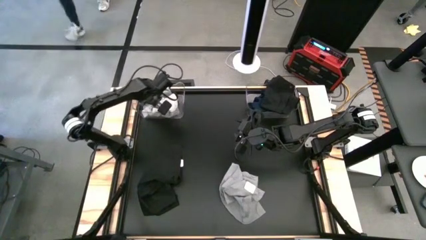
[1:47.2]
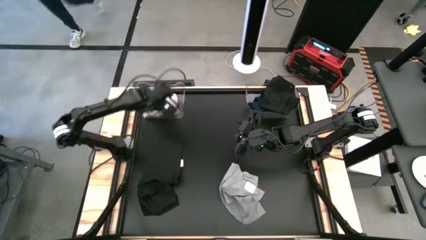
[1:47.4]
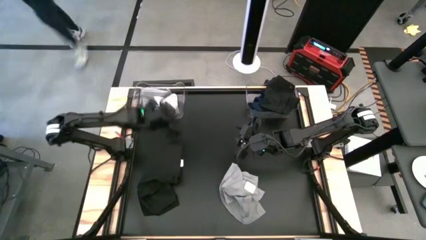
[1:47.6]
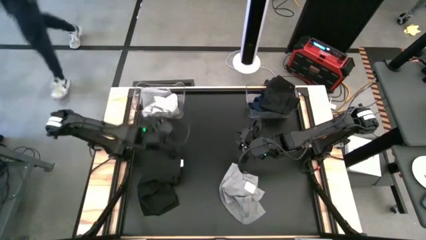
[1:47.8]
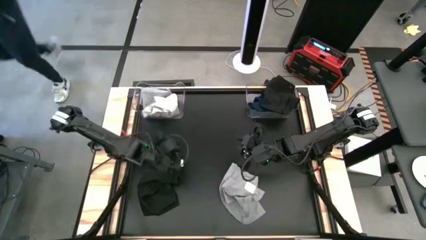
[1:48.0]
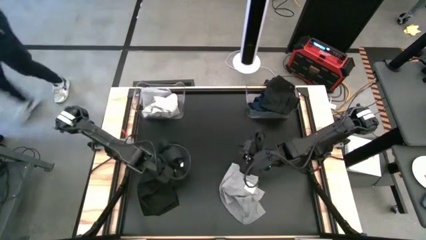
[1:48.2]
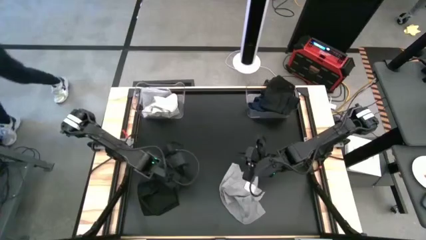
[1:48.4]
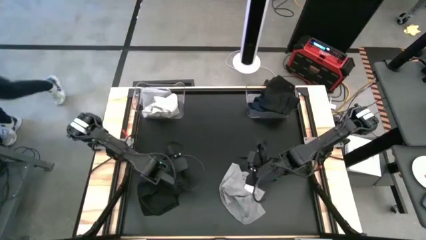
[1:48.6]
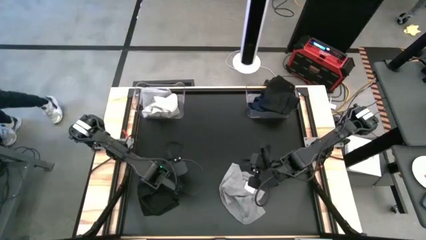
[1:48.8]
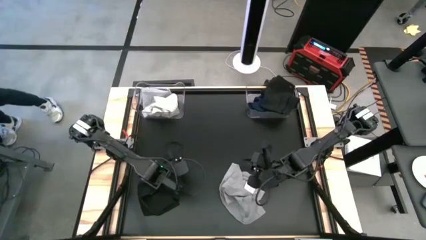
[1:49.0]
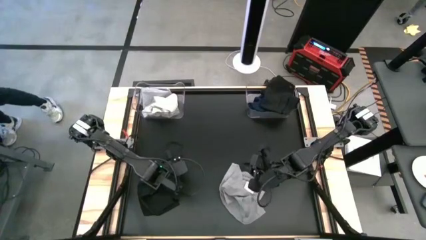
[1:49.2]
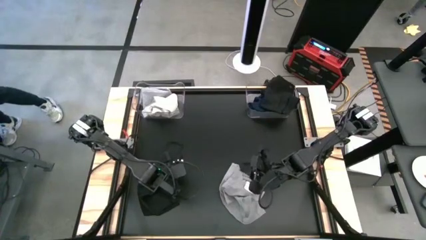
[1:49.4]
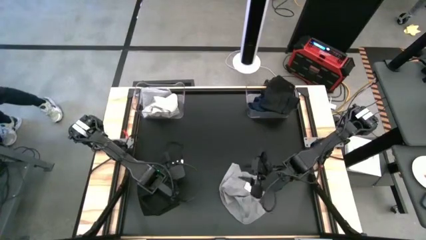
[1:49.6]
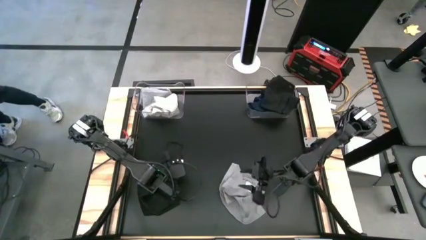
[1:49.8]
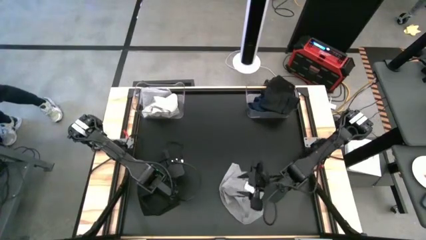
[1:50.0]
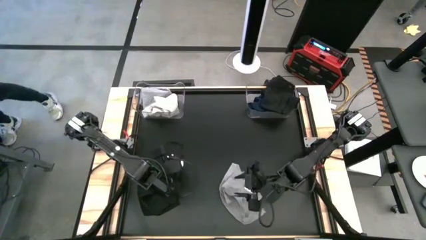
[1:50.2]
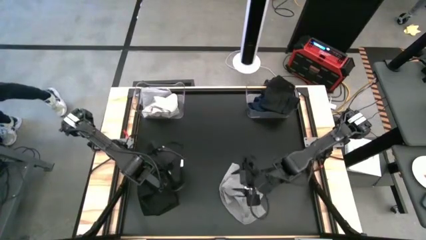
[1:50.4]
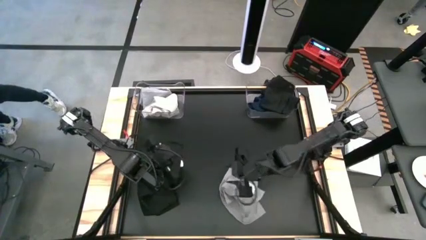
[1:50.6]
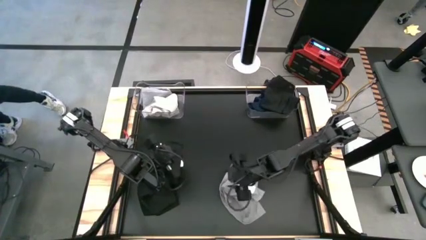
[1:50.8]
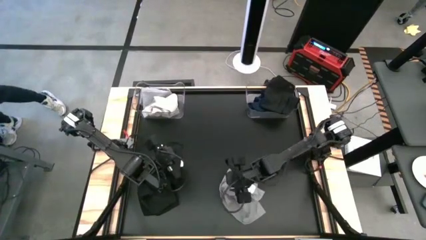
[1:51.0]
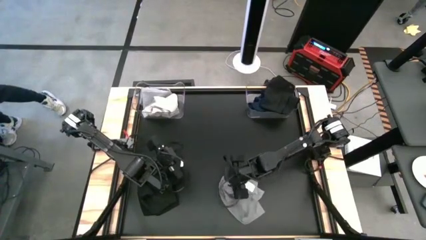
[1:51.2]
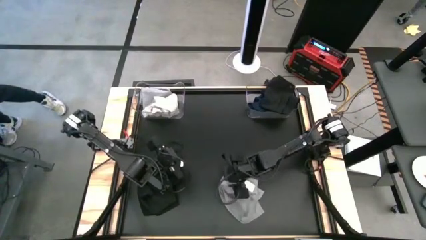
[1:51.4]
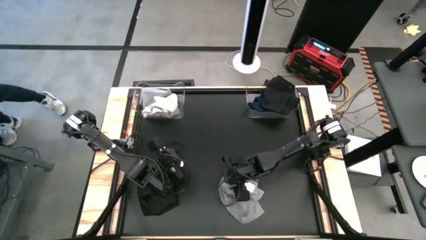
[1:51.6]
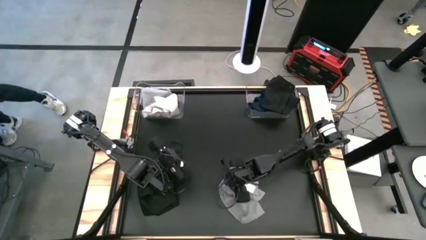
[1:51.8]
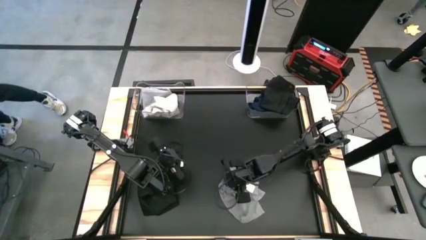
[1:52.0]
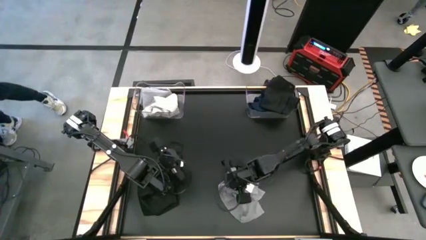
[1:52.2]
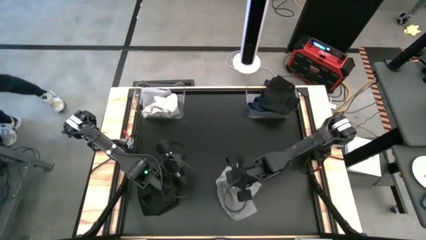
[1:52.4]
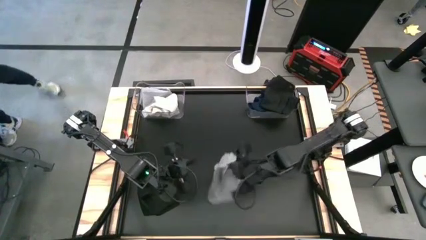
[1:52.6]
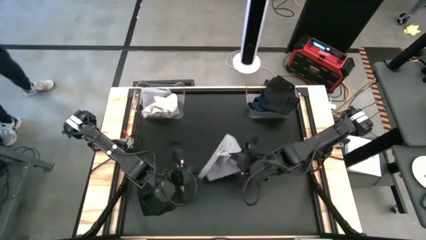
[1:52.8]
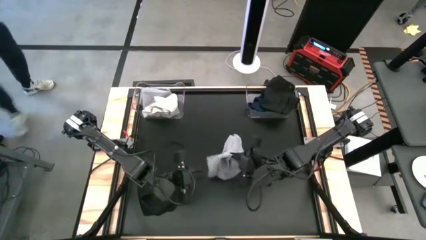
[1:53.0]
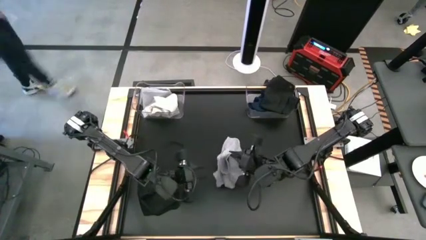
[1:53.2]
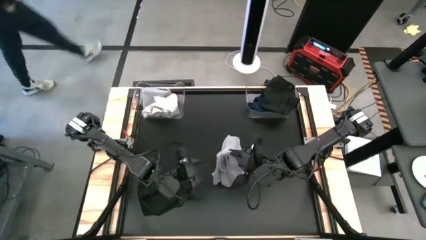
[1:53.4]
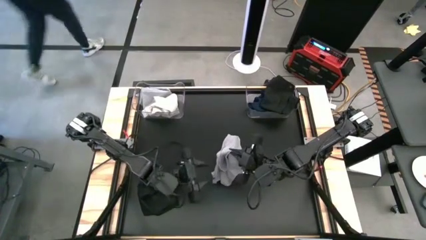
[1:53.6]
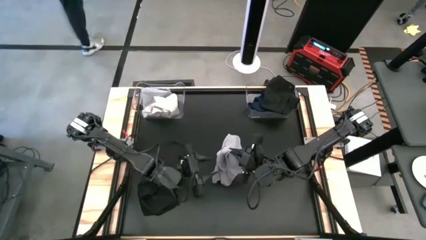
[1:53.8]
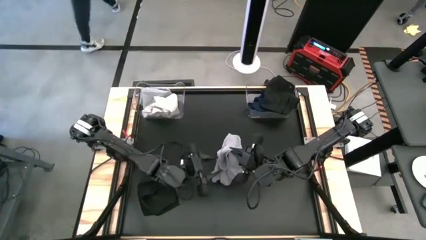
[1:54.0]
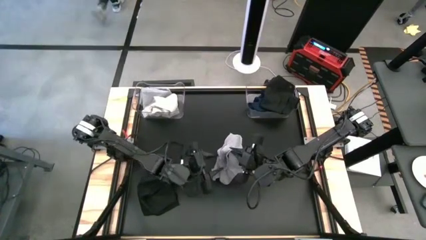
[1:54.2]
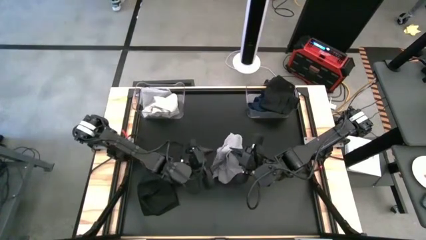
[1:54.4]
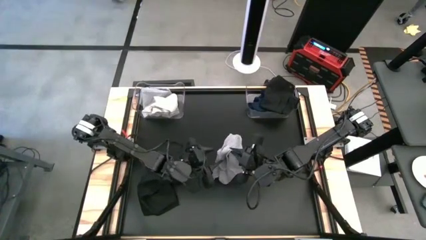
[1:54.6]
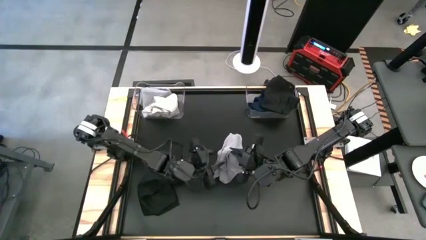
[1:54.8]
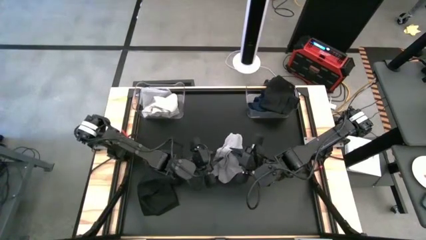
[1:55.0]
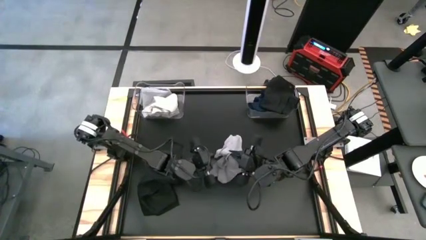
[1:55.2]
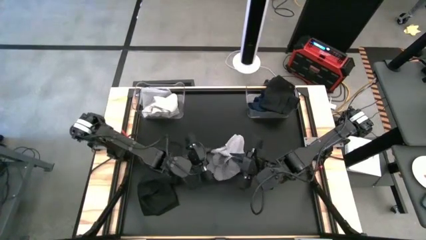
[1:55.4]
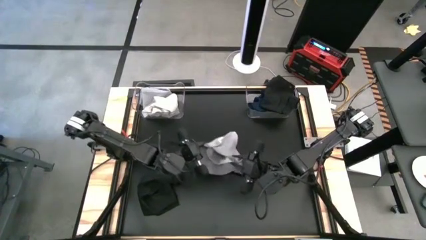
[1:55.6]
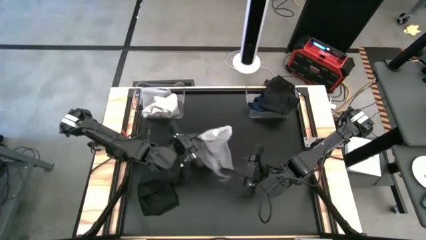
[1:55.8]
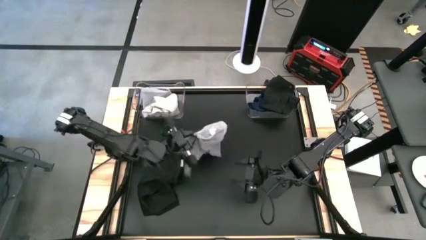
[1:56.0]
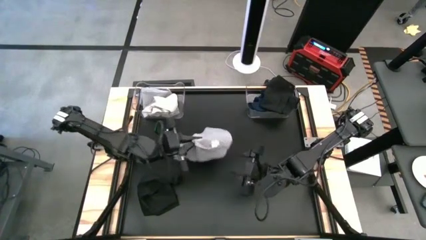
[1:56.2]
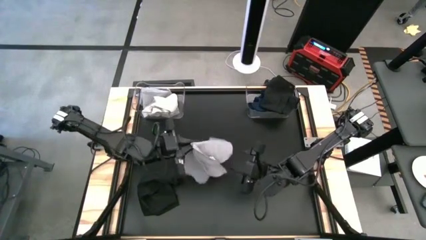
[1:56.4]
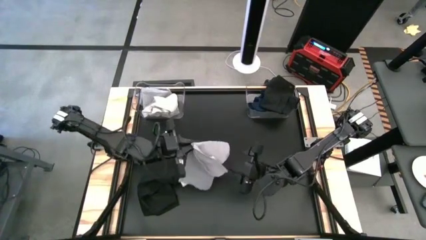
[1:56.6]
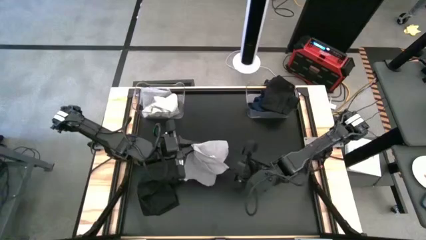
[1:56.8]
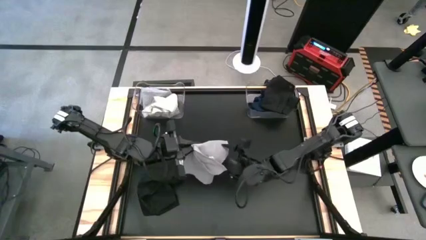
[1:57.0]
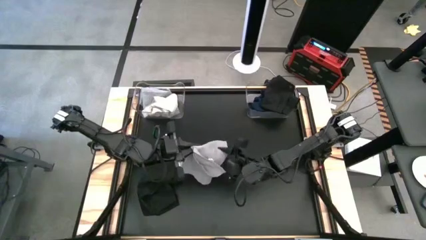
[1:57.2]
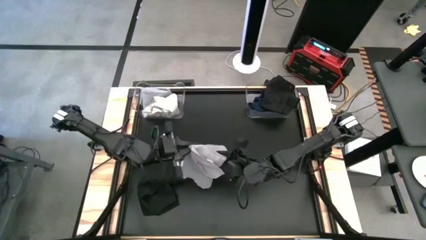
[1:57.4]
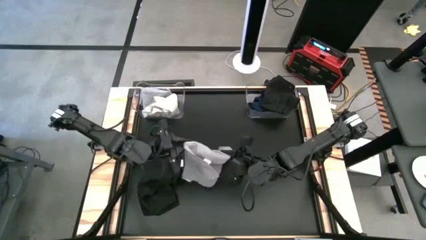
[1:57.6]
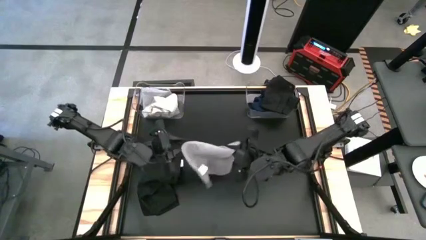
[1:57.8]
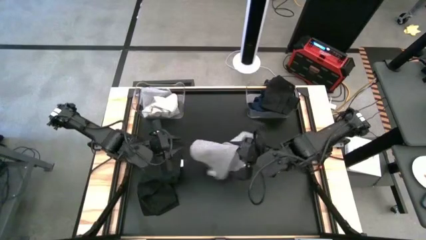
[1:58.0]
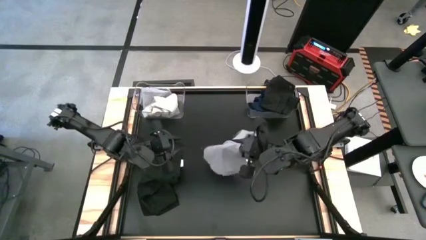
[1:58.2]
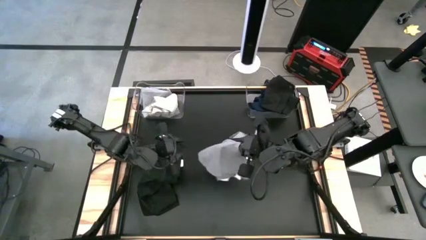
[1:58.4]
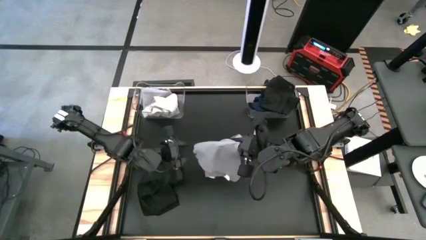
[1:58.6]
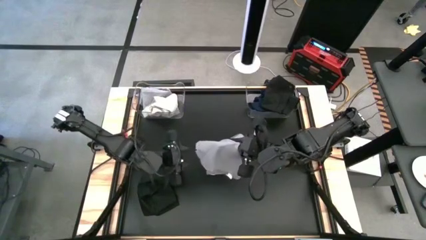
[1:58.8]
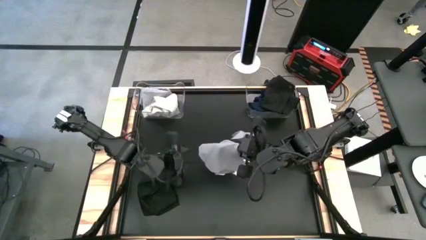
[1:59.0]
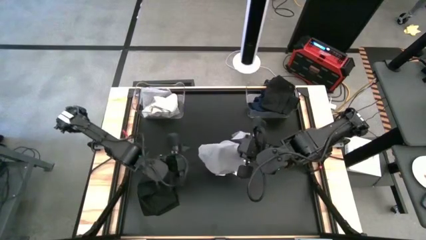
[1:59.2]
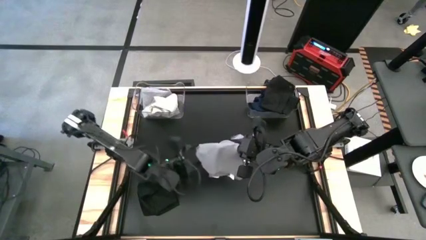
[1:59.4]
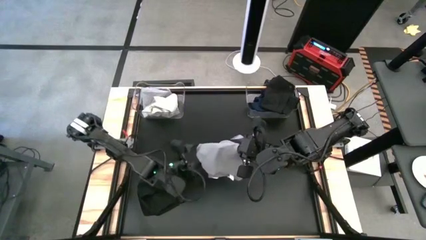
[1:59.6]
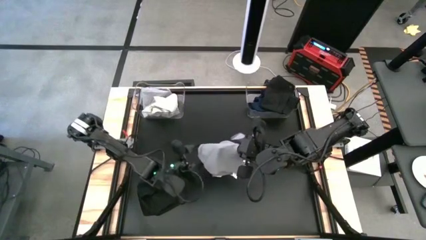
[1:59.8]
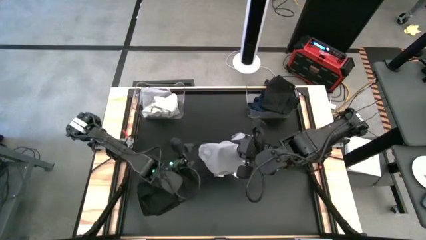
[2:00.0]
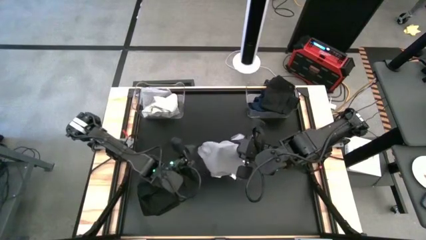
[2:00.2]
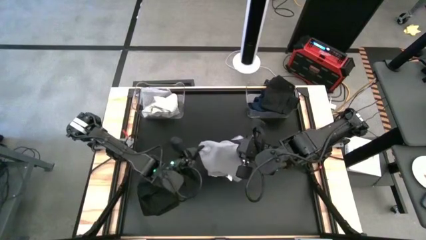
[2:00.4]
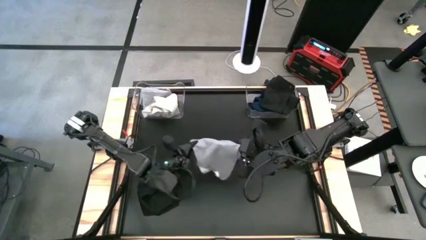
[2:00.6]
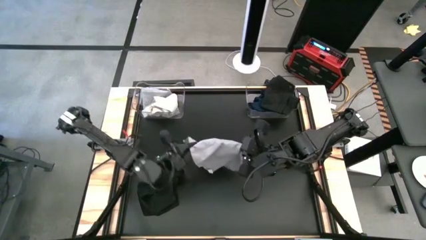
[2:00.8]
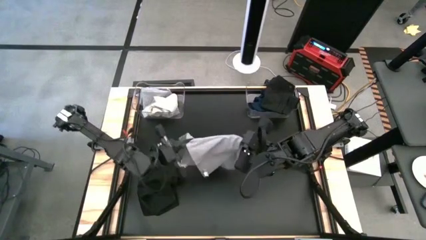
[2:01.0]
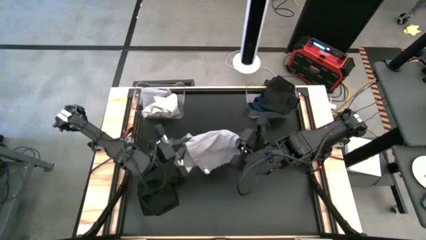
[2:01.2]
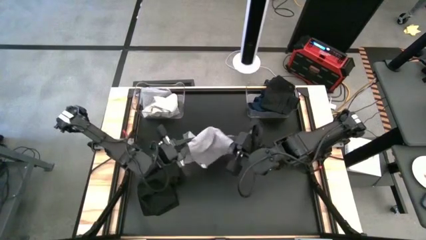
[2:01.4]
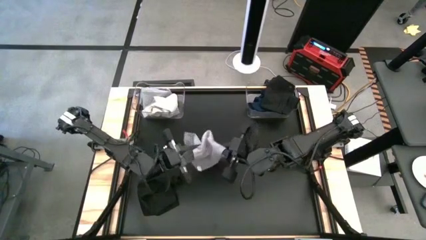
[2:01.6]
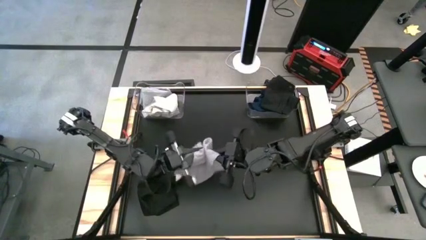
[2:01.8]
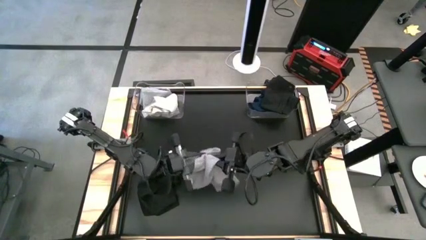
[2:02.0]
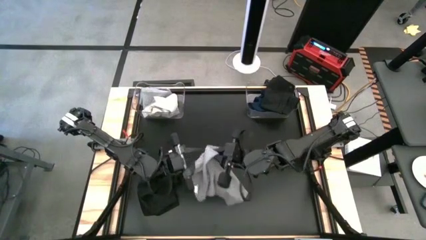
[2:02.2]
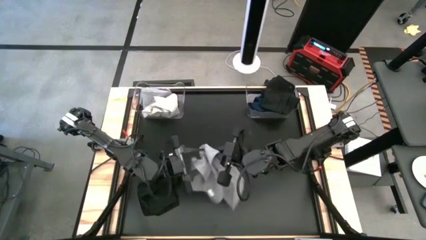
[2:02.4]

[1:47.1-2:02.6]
Task: Sort towels by color in basket
Put the gray towel into the left transparent bin
